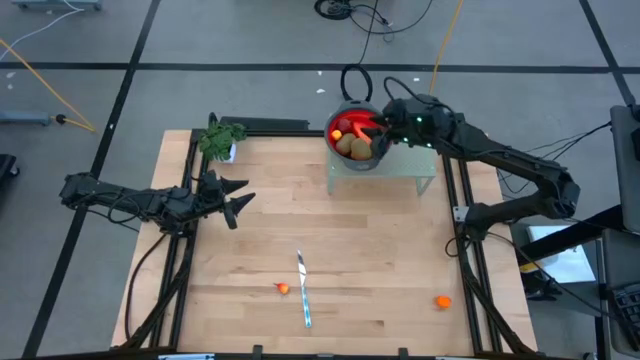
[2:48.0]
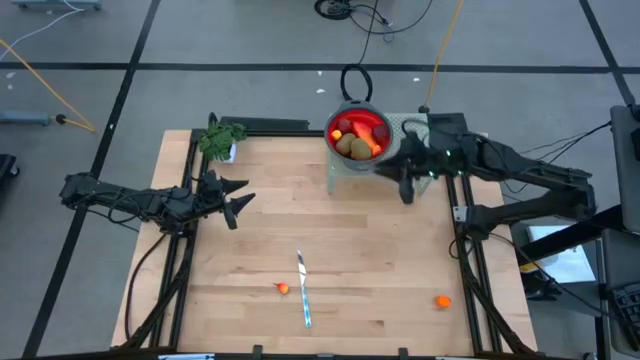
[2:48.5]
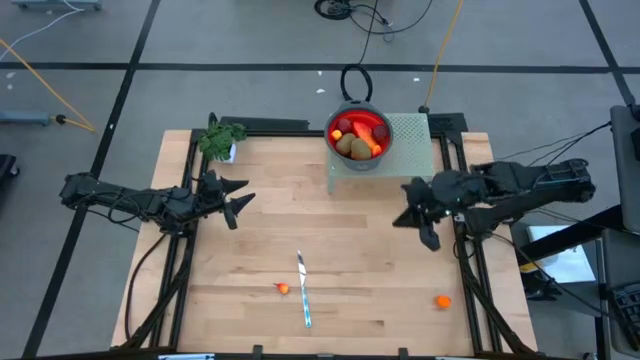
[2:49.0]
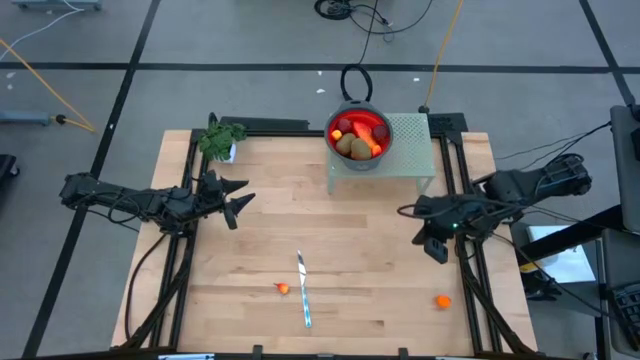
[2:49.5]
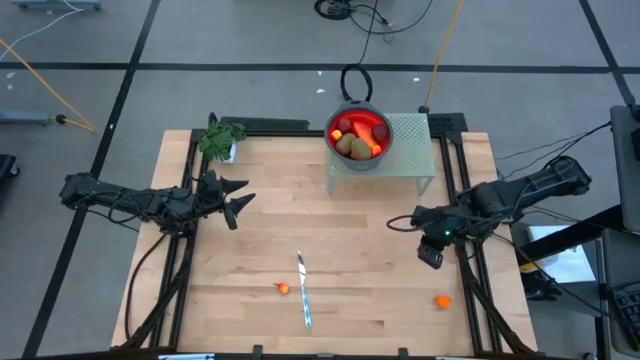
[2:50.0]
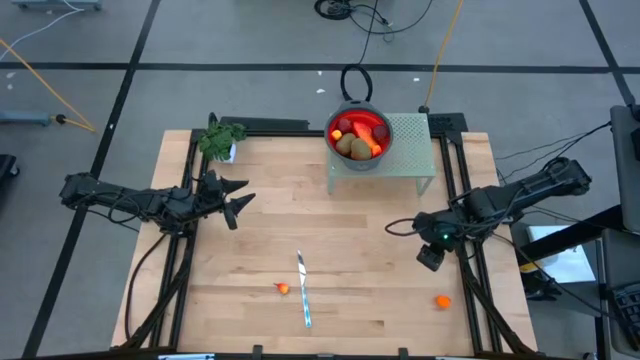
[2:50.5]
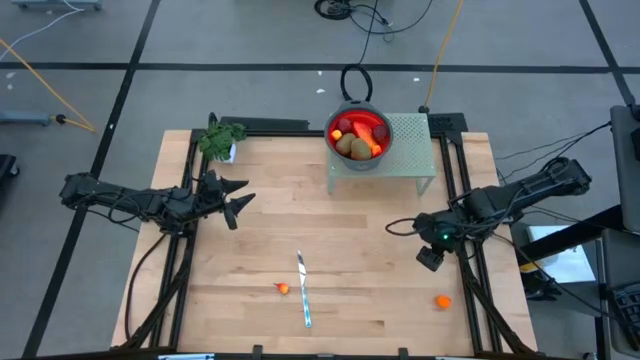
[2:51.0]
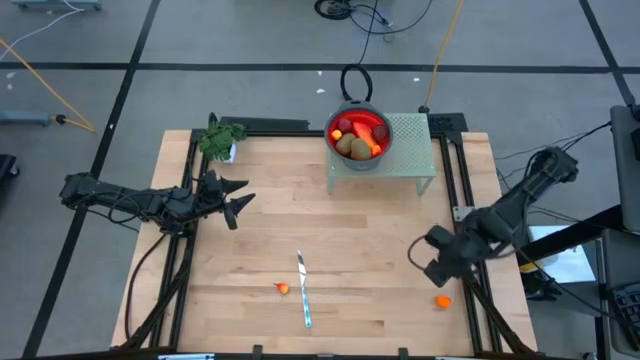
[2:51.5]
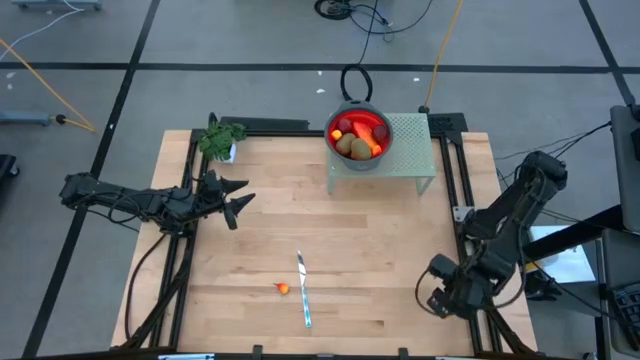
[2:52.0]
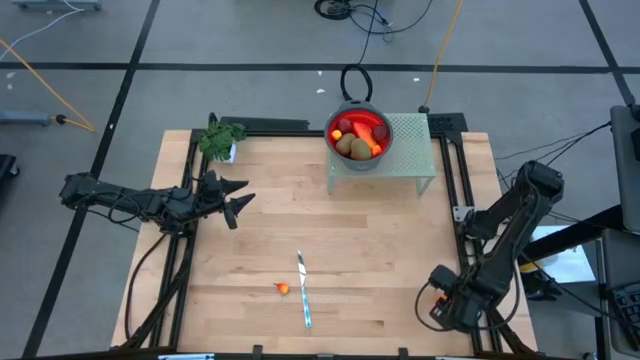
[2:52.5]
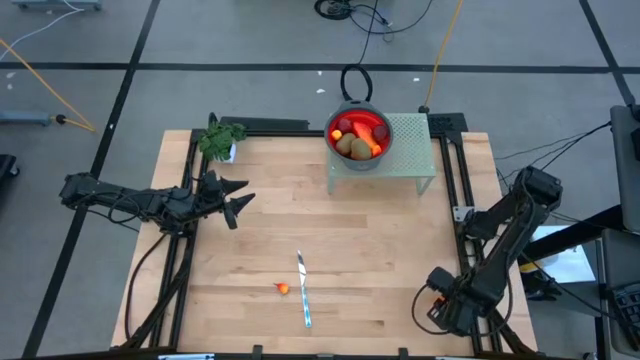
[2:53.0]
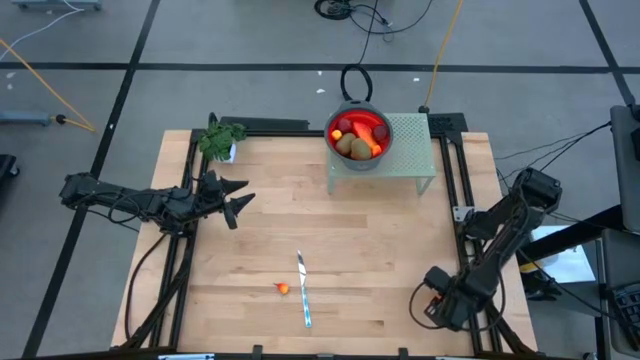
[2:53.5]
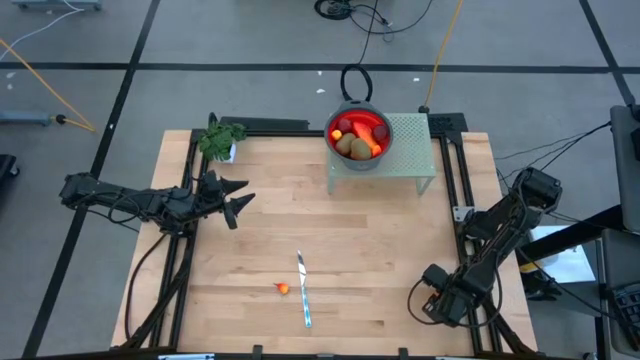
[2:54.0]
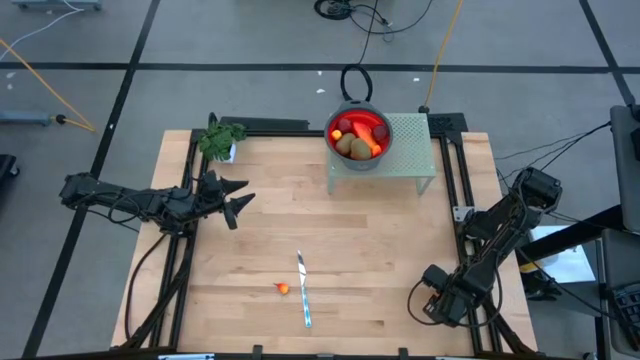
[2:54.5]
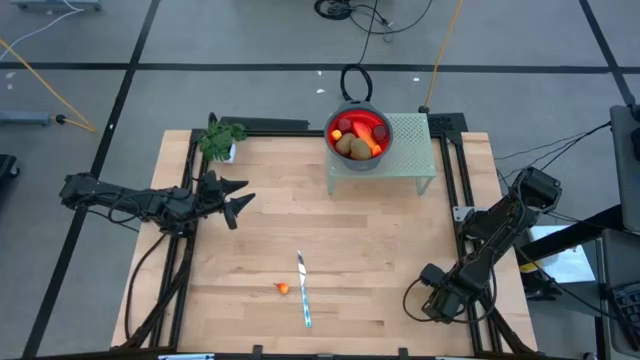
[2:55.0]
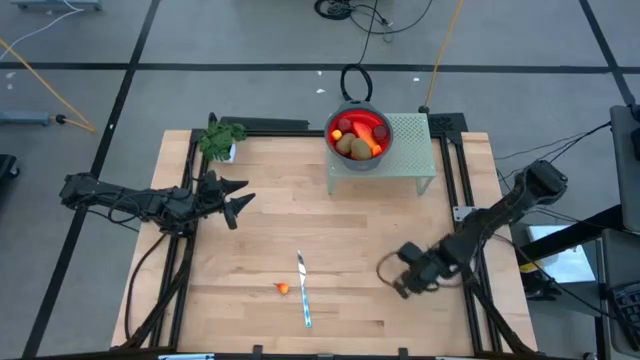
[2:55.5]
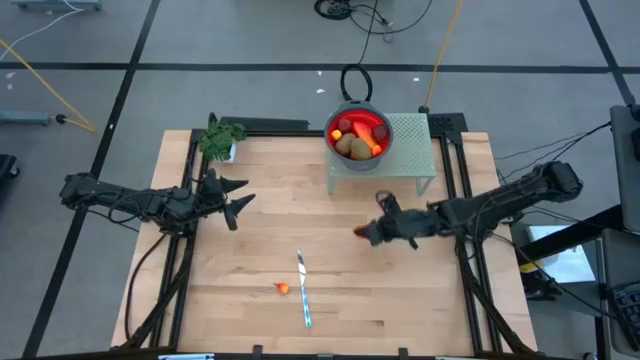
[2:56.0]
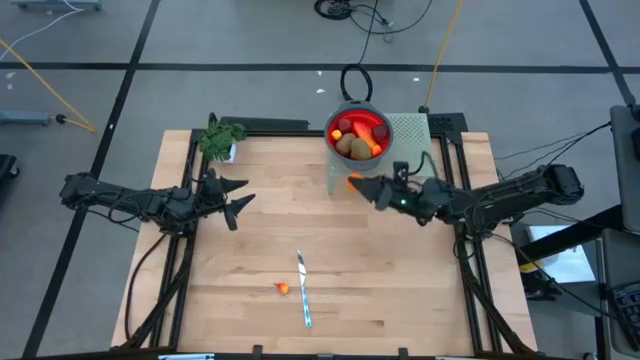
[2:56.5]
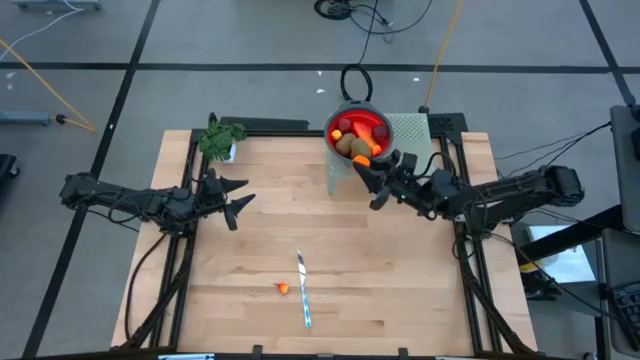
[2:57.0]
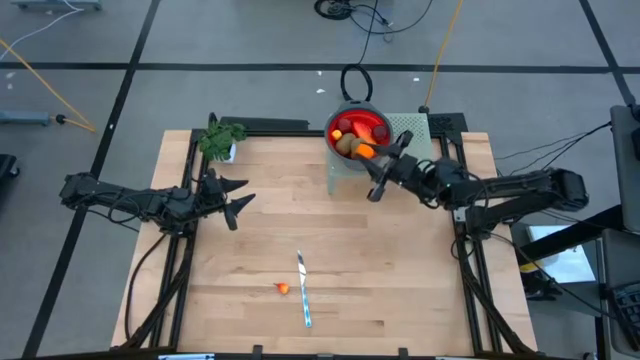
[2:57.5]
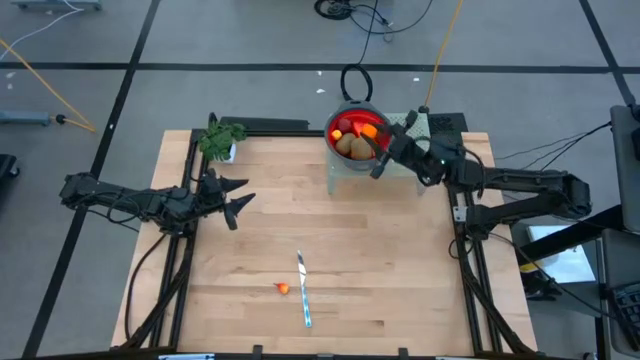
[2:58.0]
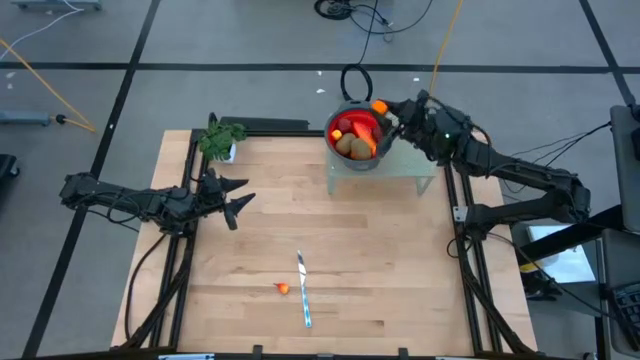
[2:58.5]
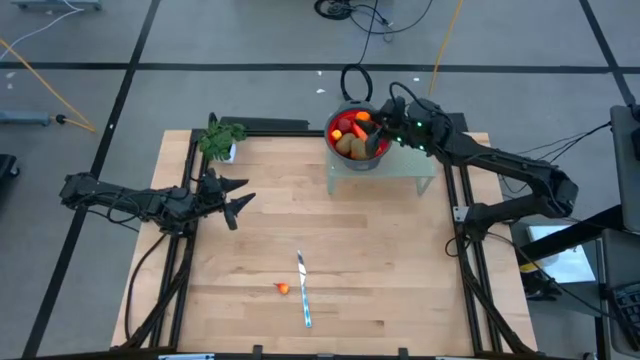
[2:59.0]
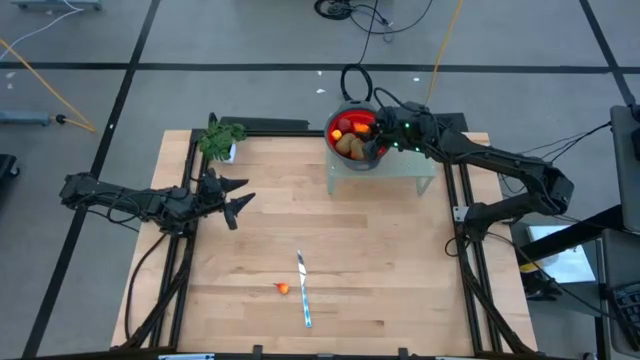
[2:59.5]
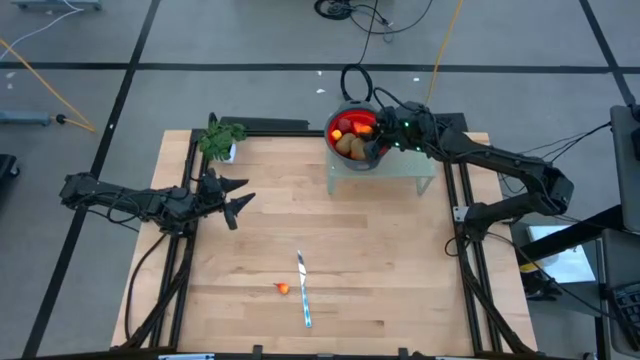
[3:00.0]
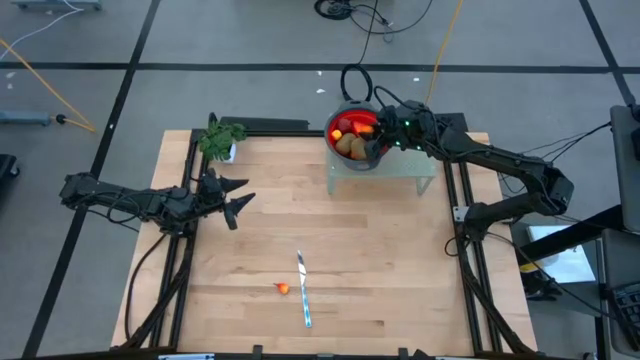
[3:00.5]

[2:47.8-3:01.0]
Task: Pick & Place Fruit
Put the tangerine into the red strainer bowl on the shelf

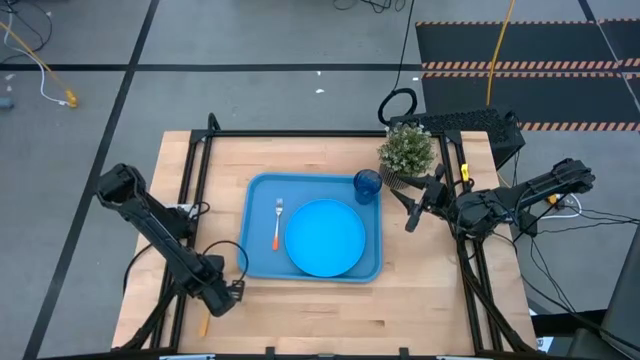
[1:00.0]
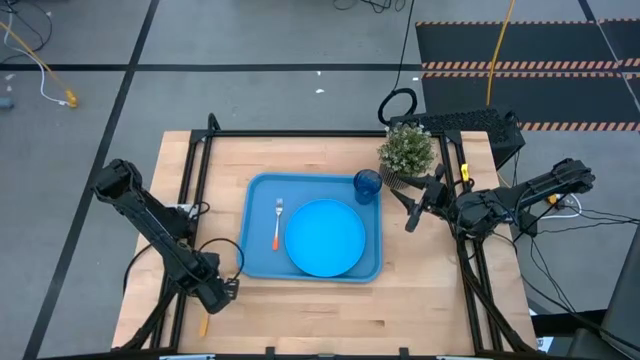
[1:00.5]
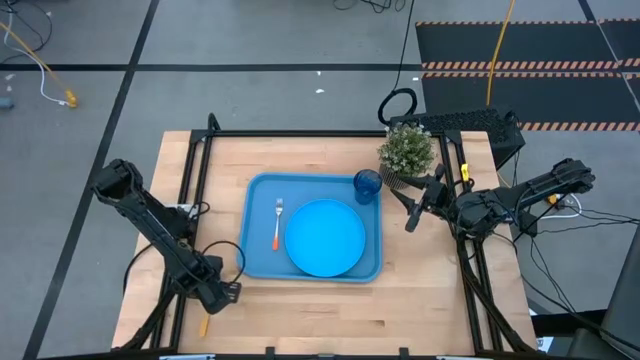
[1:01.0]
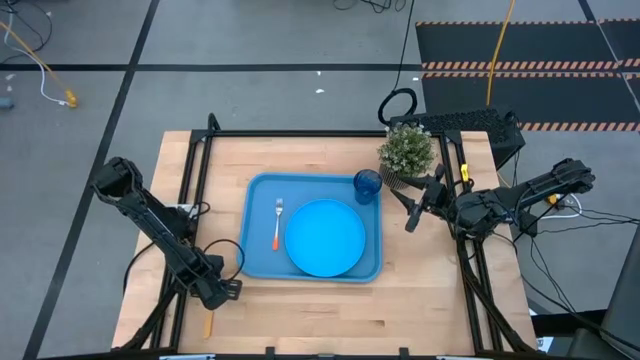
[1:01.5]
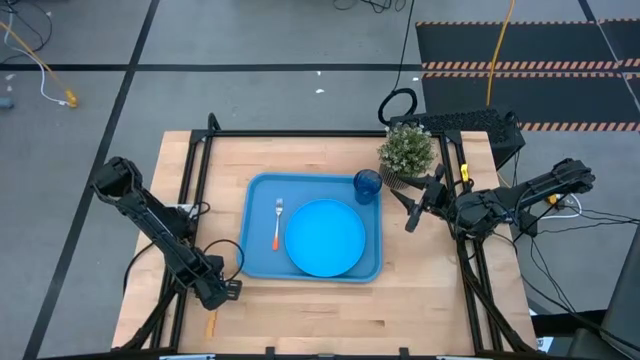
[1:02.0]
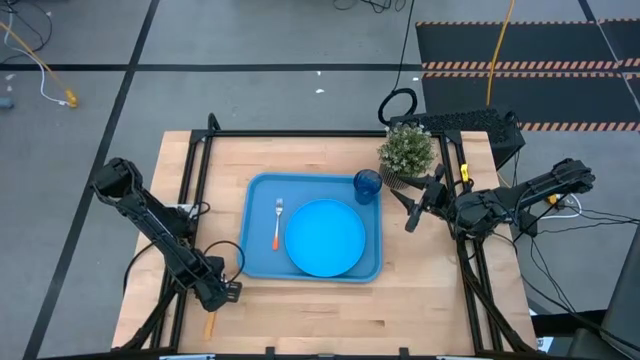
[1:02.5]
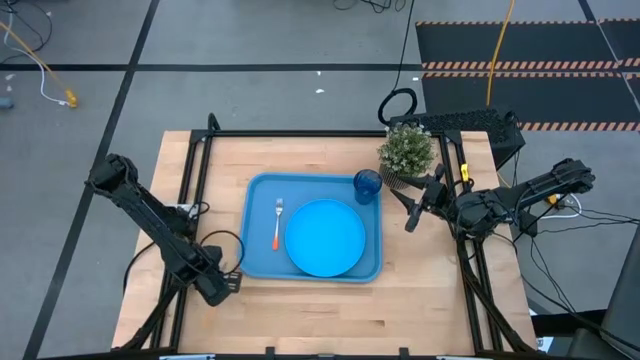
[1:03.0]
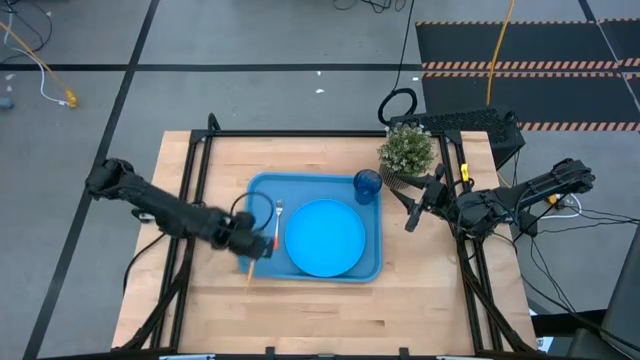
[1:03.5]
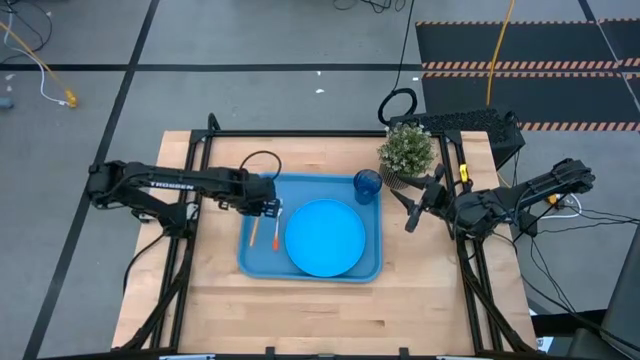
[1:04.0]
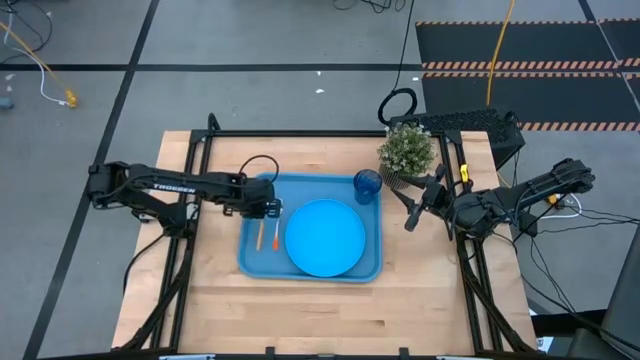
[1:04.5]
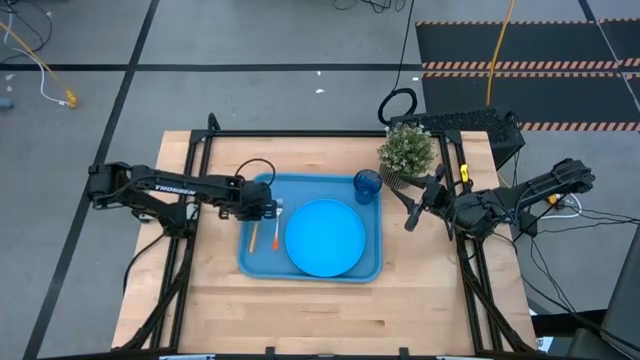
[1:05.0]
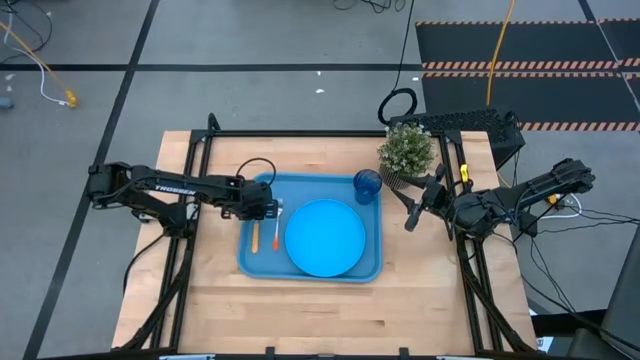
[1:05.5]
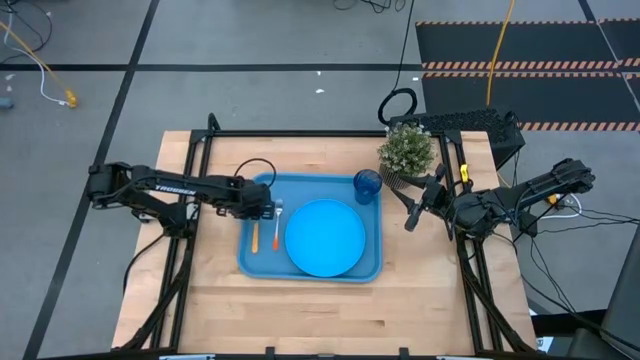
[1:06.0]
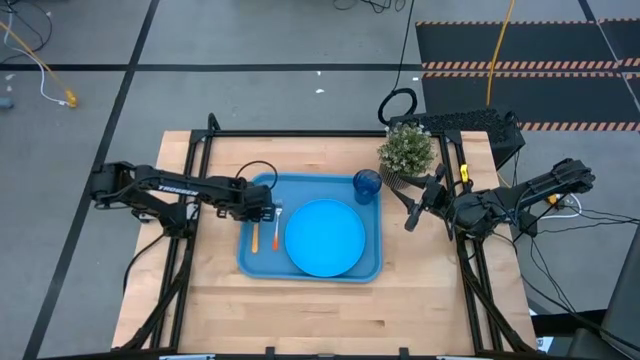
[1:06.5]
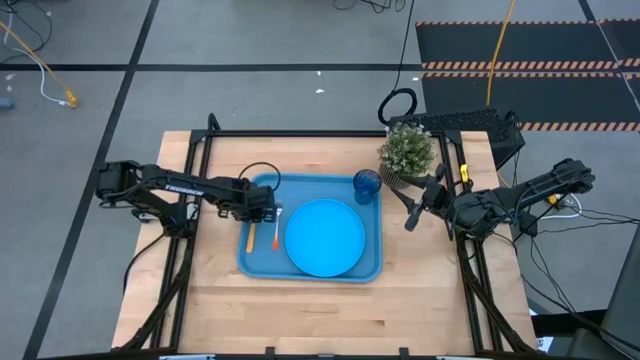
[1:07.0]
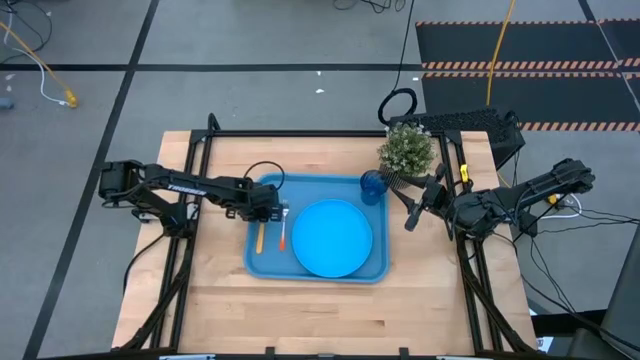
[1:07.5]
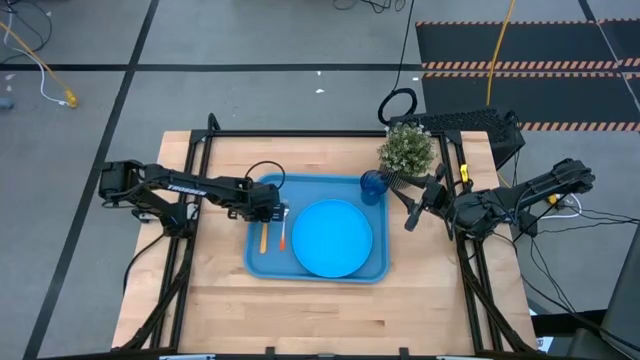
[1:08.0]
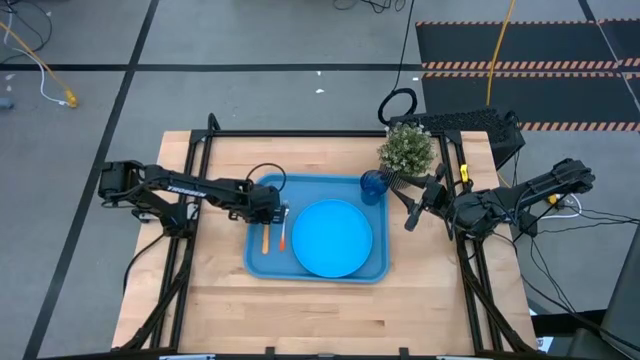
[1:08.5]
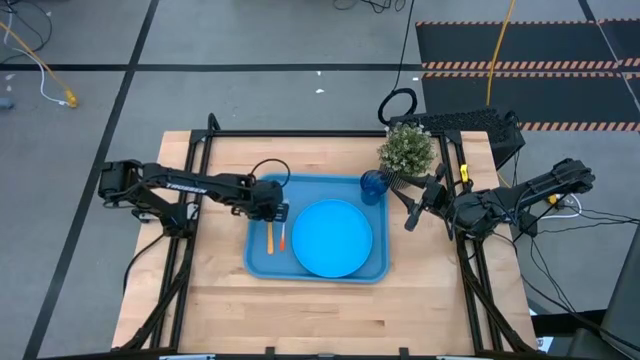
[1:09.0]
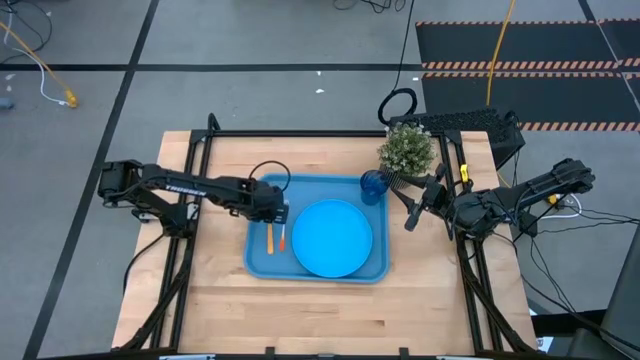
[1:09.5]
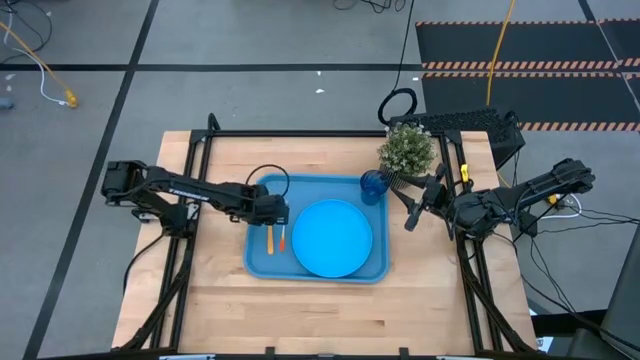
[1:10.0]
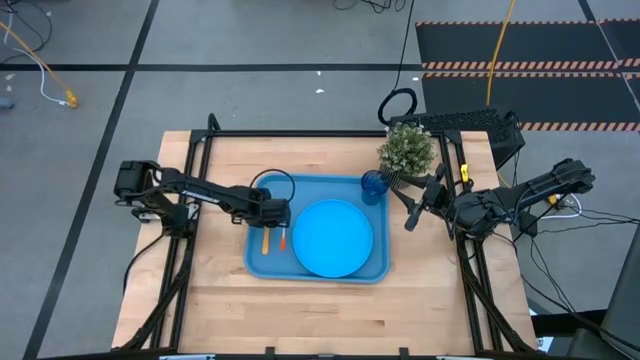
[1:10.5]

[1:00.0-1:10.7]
Task: Pick and place plate/cup/fork/spoon on tray
Put the yellow spoon on the blue tray to the left of the orange fork
